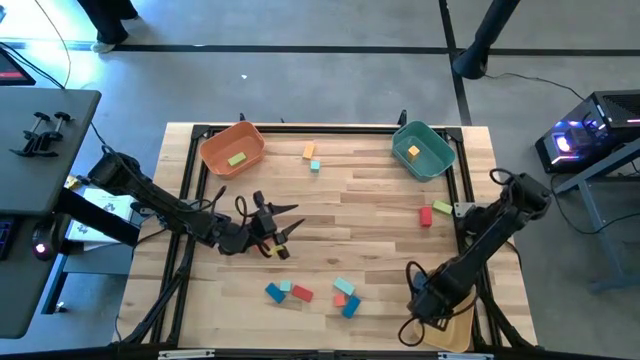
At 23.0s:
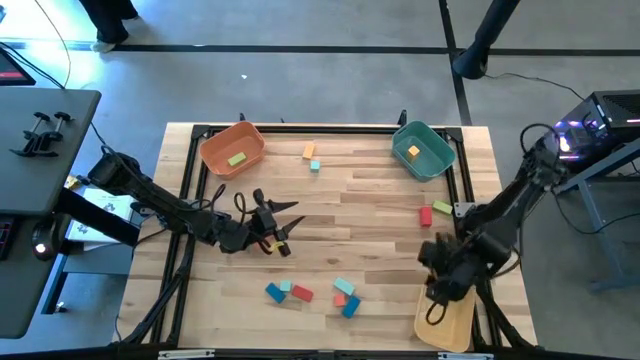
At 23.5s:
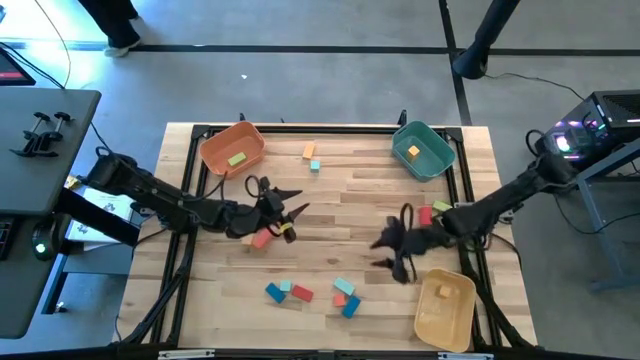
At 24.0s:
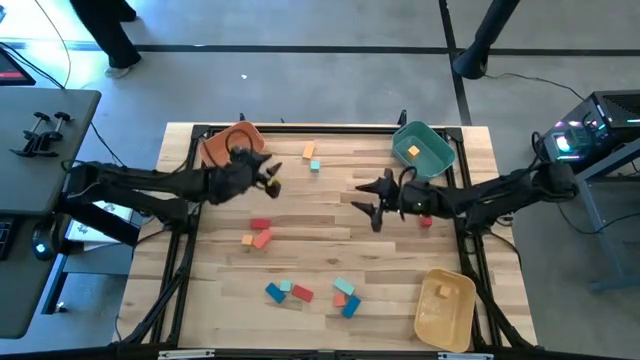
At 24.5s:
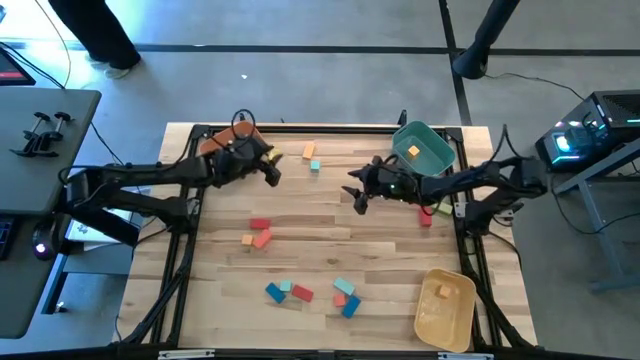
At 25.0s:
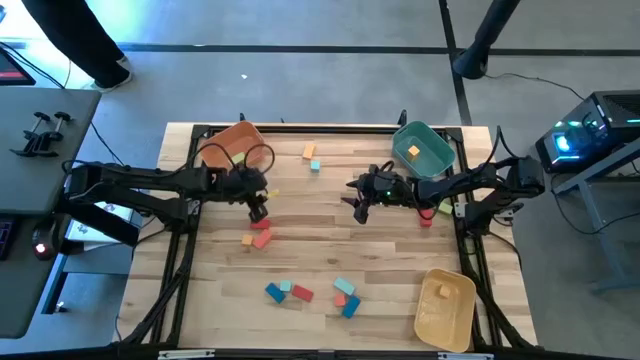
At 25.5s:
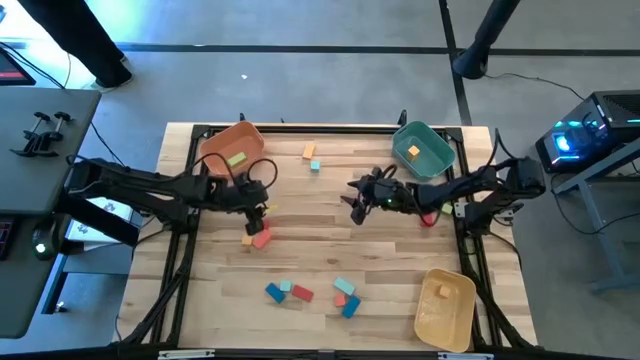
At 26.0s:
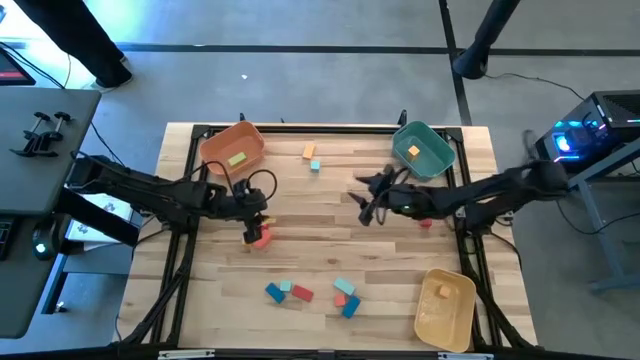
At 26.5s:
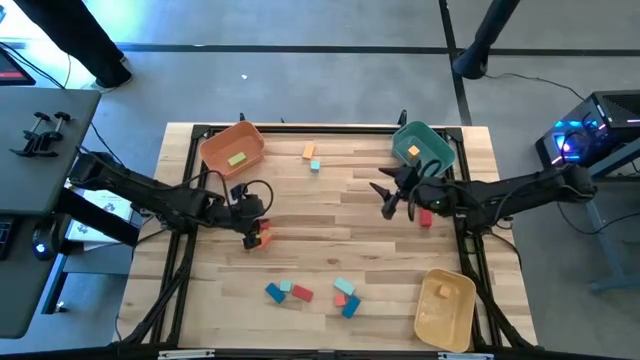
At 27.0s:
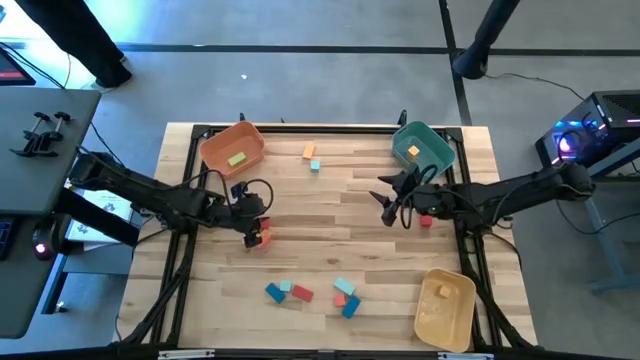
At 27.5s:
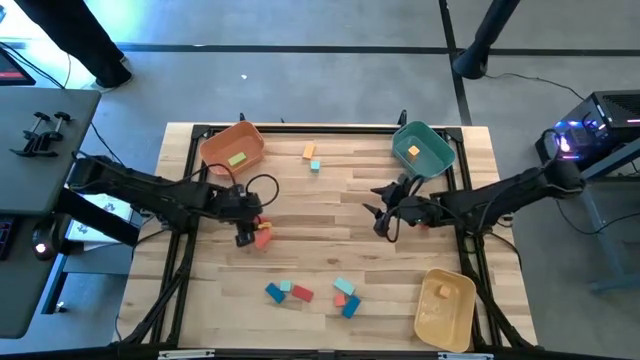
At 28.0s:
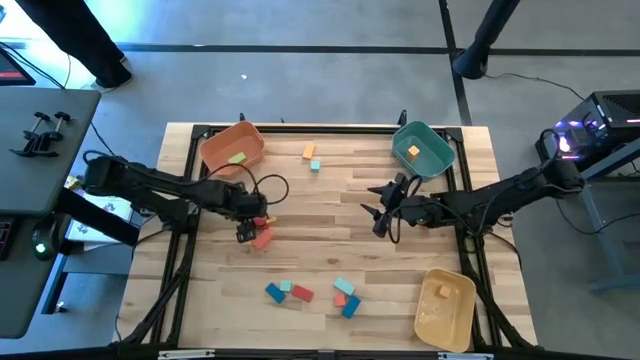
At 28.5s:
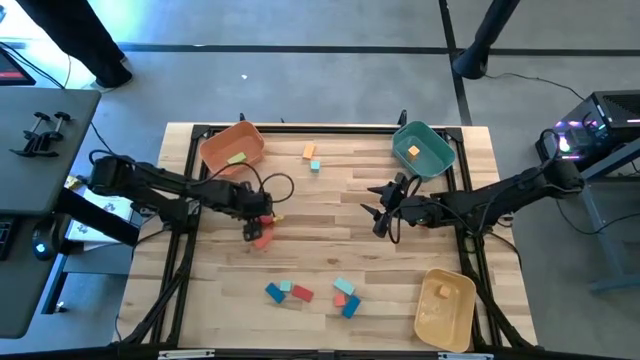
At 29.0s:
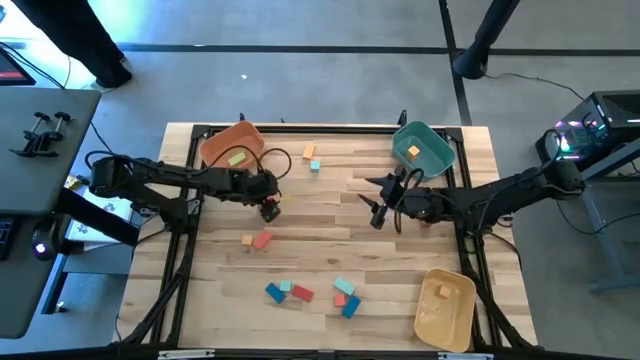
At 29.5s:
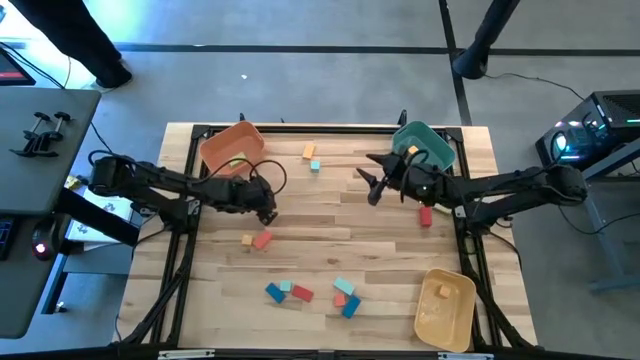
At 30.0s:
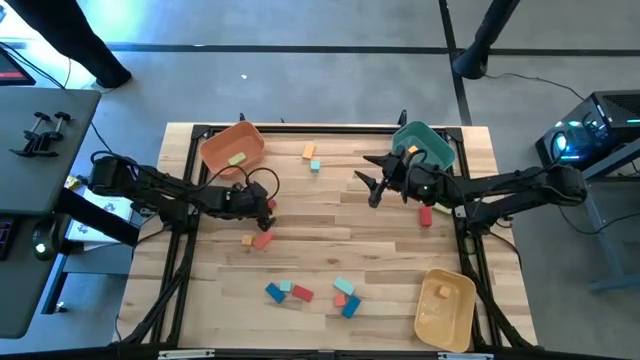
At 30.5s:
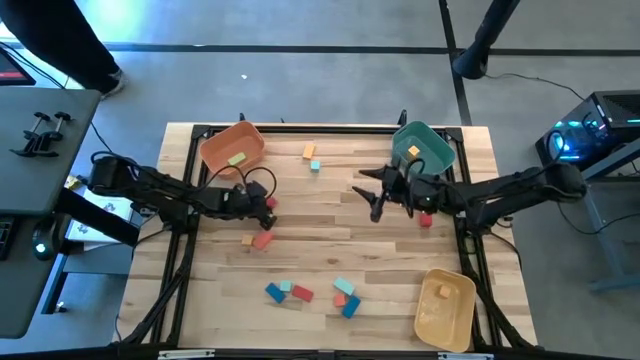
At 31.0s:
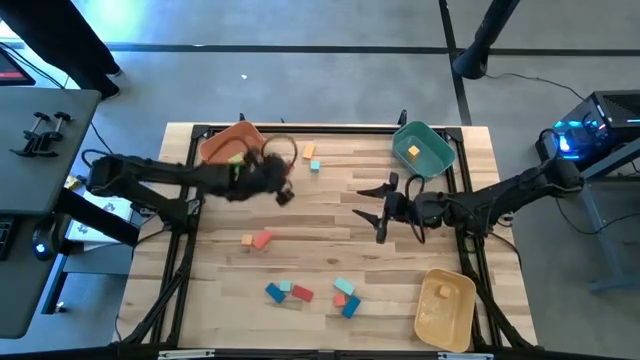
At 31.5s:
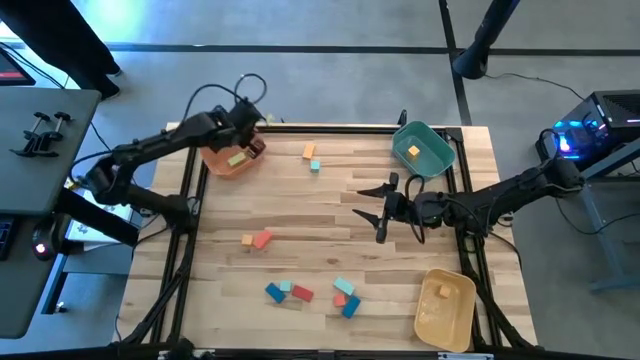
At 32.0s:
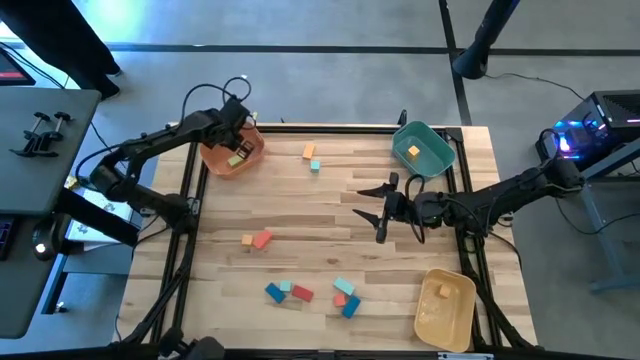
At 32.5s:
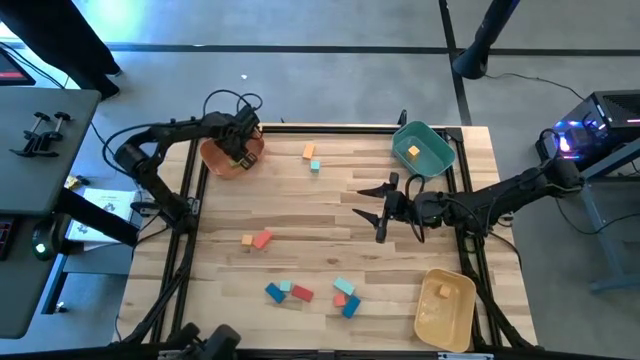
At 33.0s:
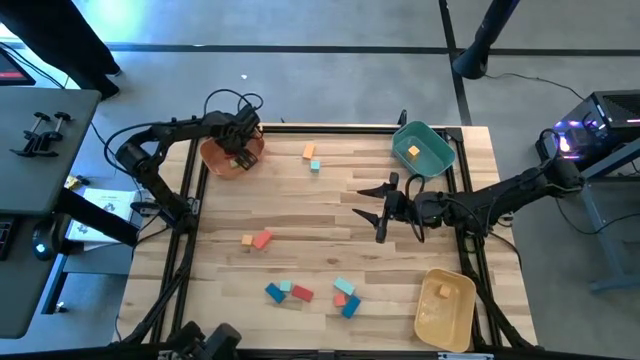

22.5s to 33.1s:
Task: Sort blocks by size
Put the thin red rectangular block into the orange bin

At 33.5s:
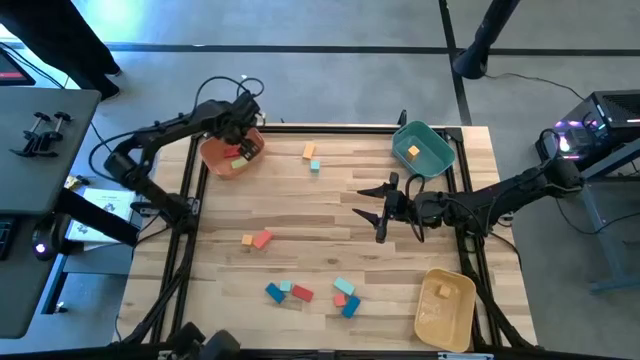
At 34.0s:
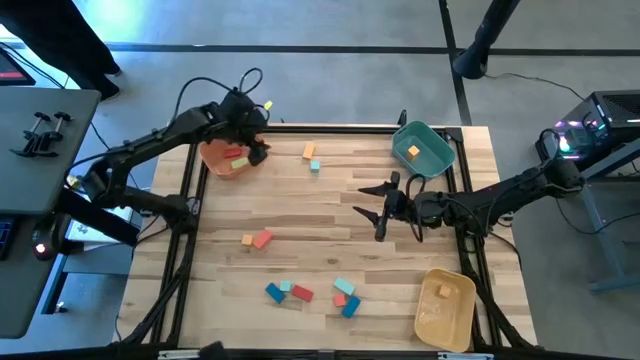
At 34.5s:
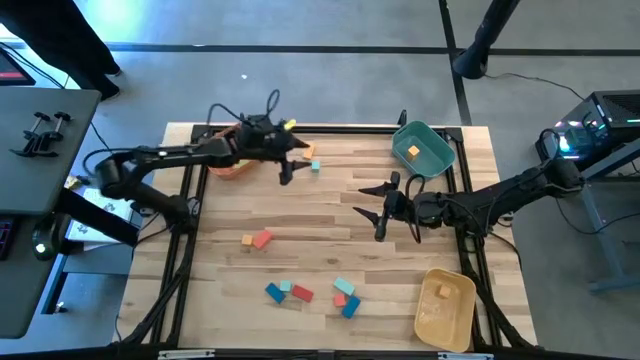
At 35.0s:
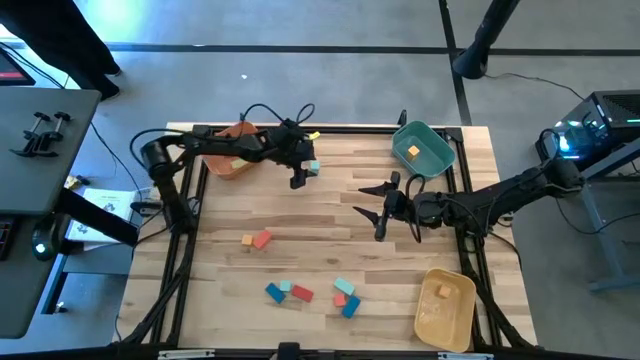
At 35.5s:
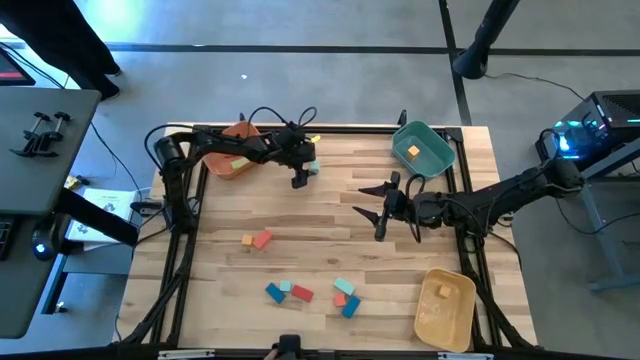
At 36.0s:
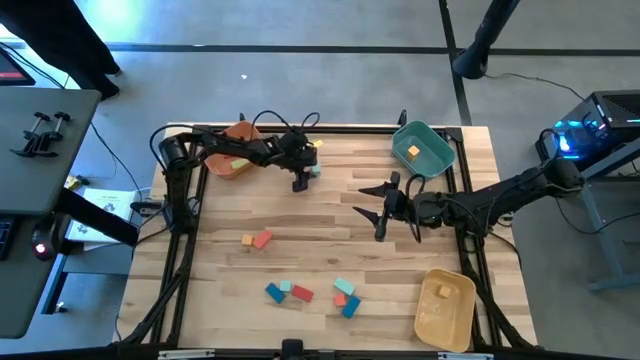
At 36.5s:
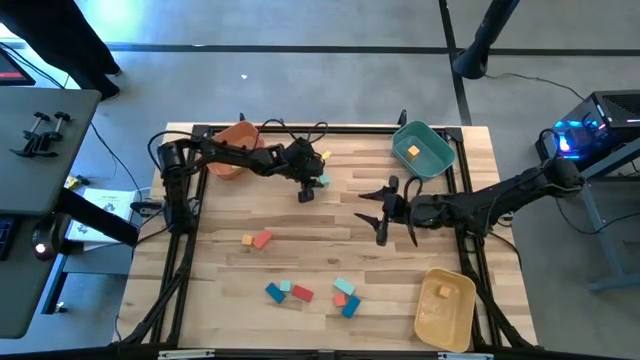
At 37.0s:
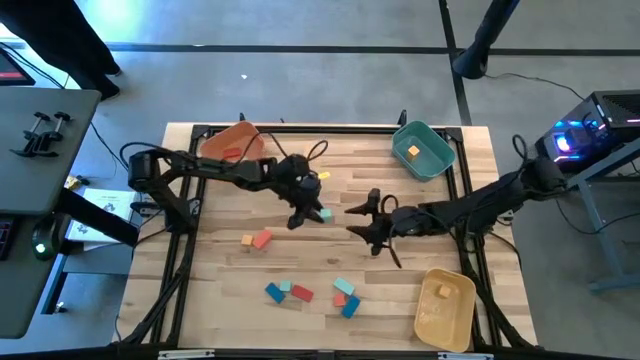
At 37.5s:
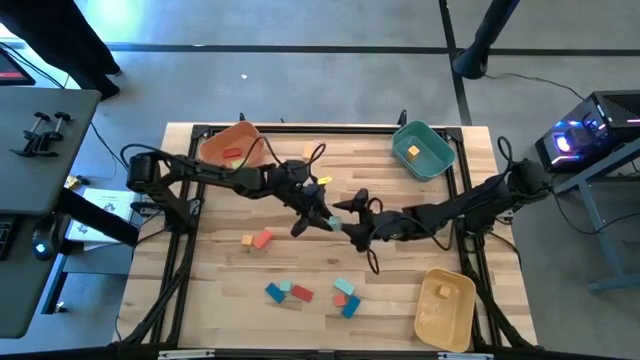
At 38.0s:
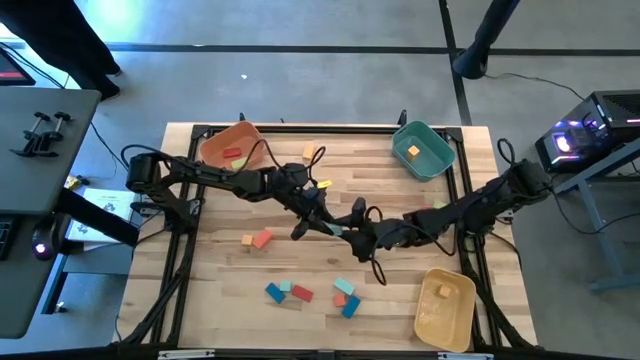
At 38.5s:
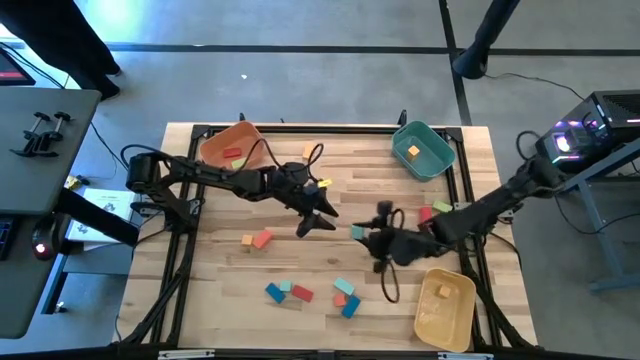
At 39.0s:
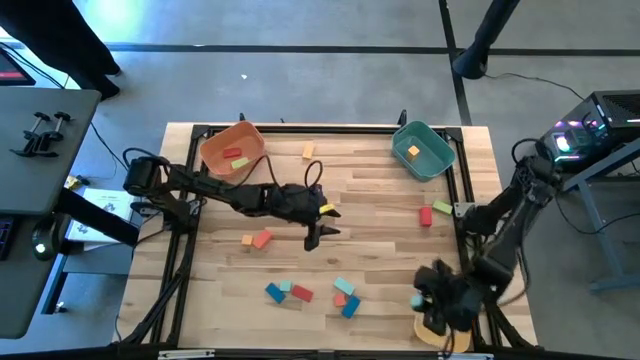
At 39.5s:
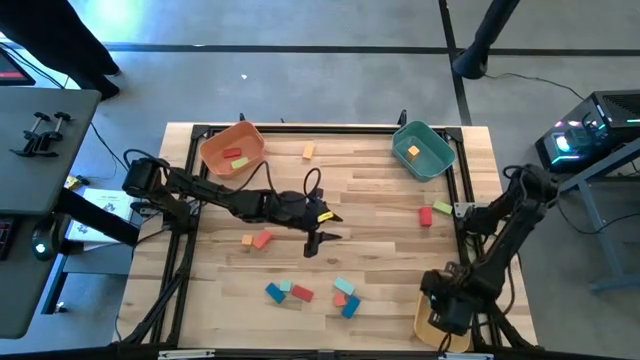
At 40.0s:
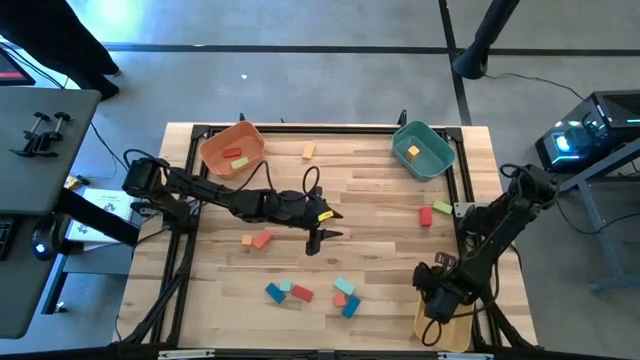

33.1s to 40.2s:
Put the light blue cube block into the yellow bin

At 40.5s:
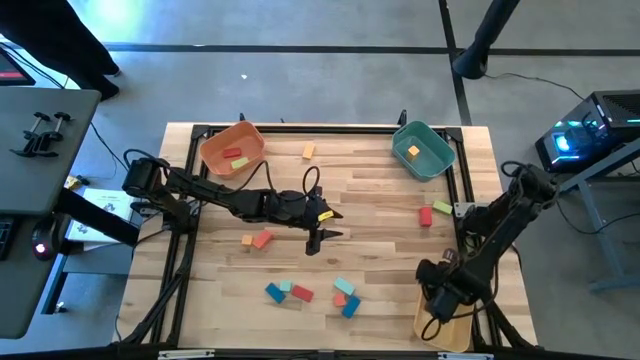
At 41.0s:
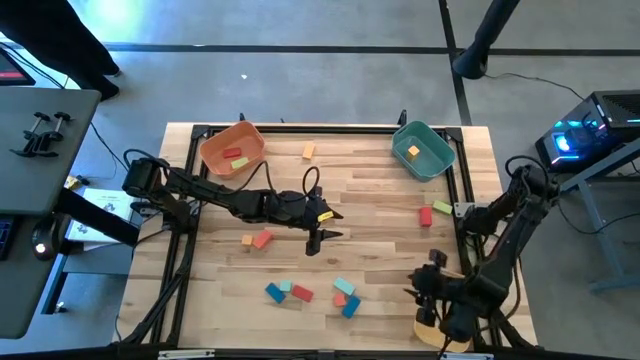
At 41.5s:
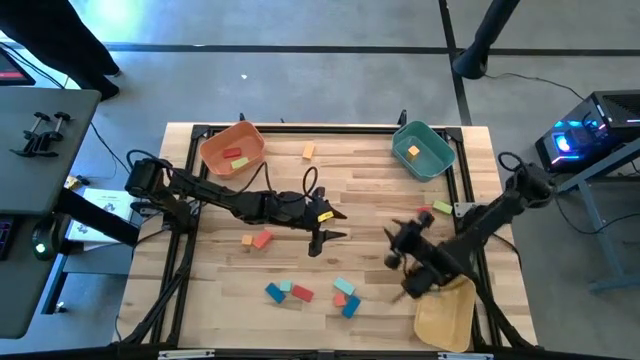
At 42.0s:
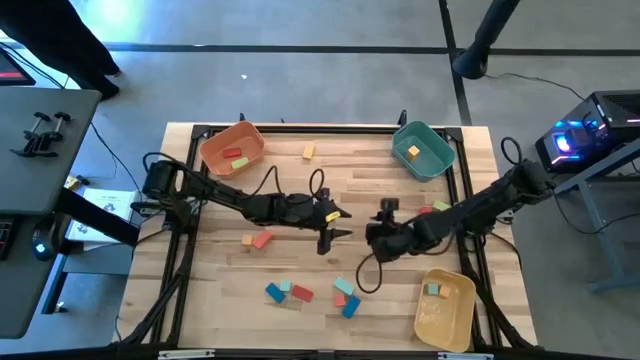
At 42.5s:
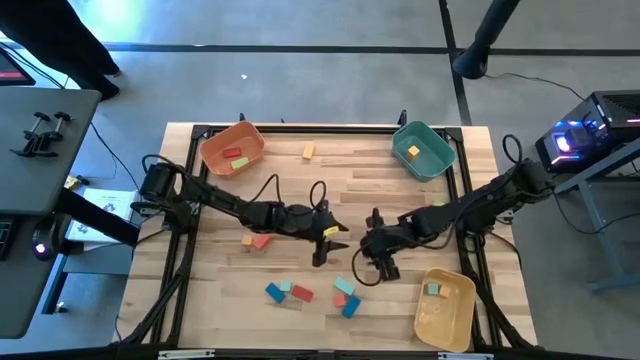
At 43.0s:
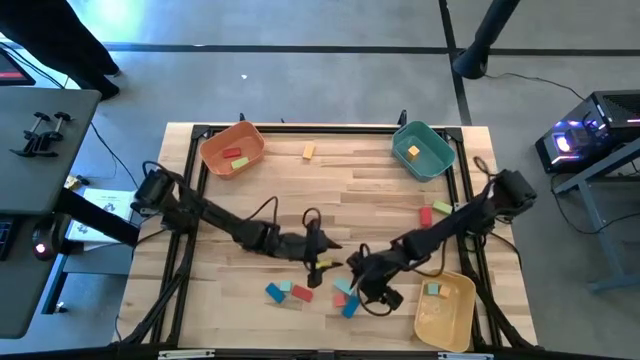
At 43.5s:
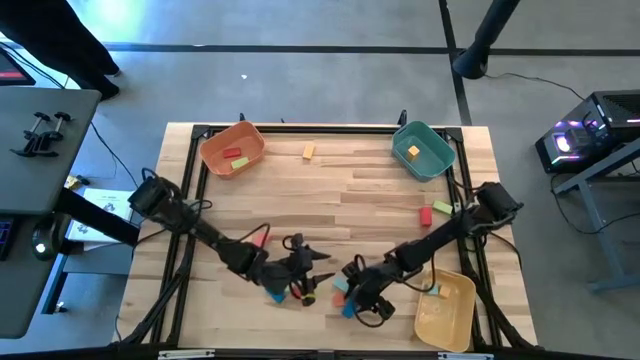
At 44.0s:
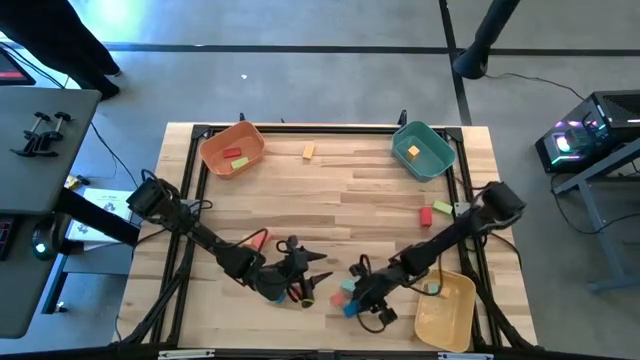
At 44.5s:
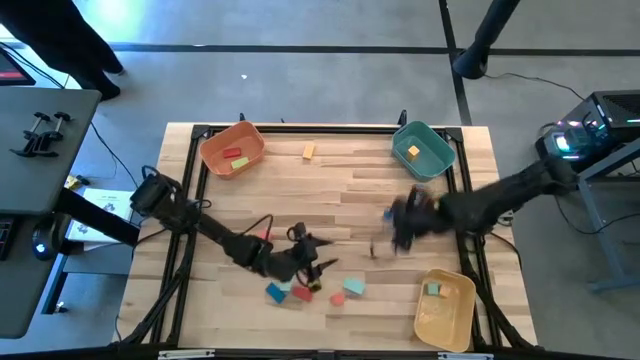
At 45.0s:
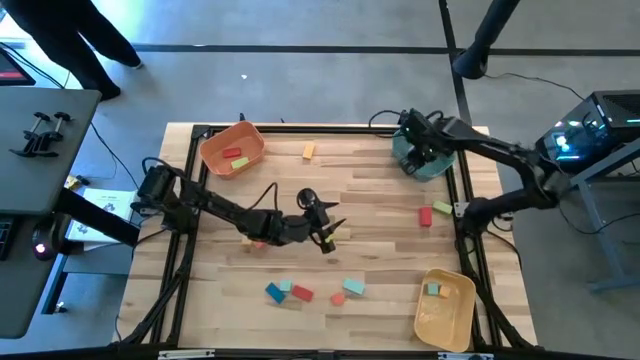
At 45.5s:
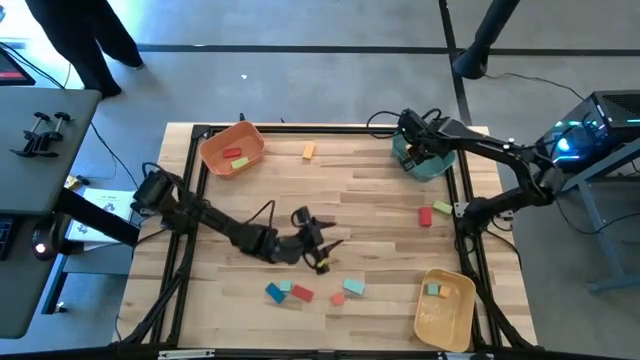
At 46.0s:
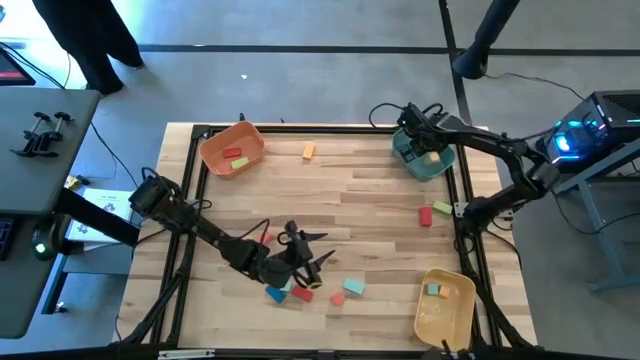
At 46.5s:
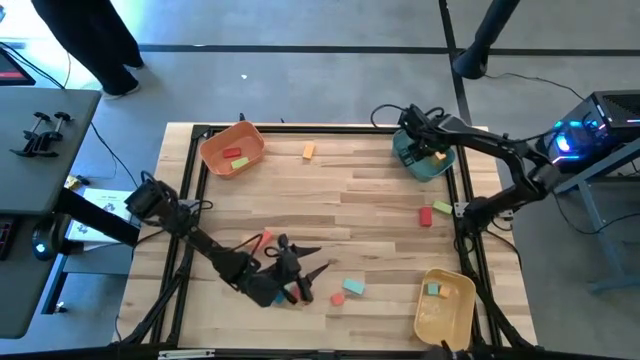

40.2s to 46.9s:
Put the thick blue rectangular block into the green bin
